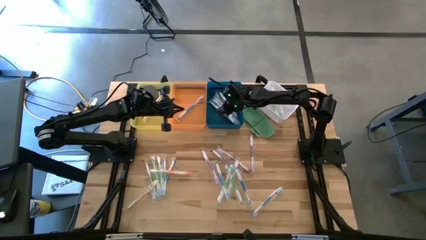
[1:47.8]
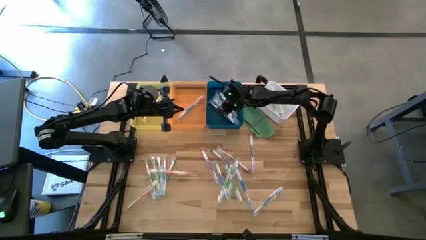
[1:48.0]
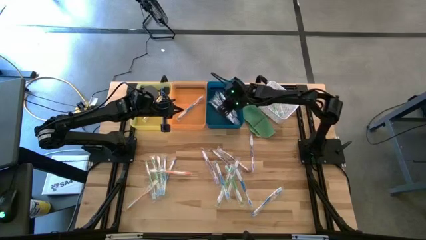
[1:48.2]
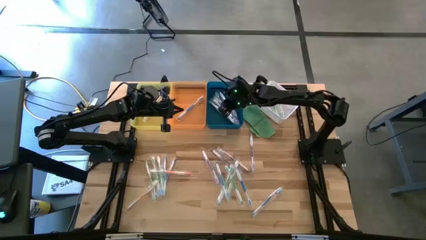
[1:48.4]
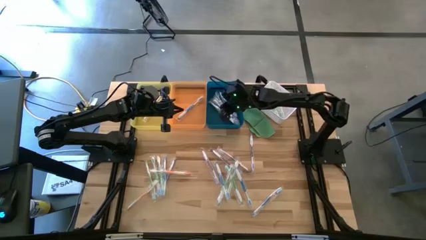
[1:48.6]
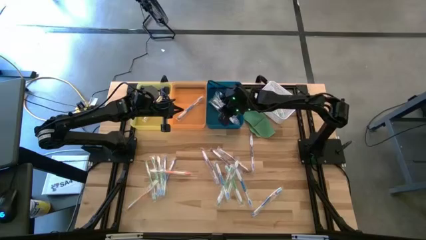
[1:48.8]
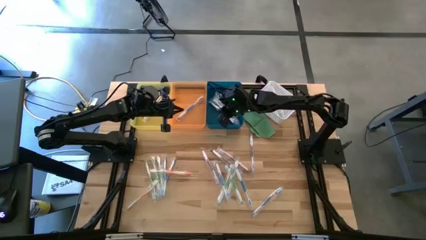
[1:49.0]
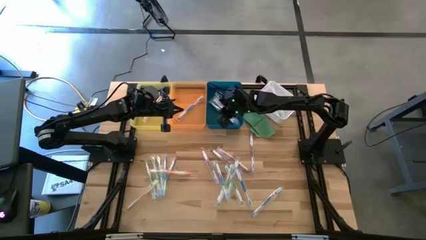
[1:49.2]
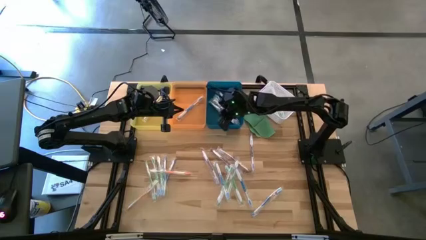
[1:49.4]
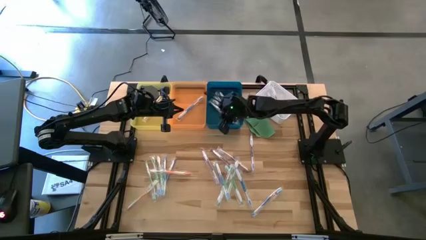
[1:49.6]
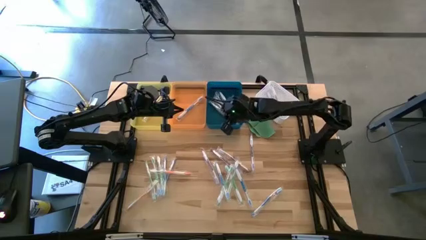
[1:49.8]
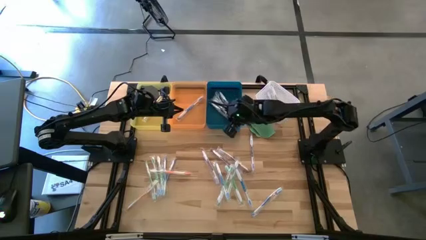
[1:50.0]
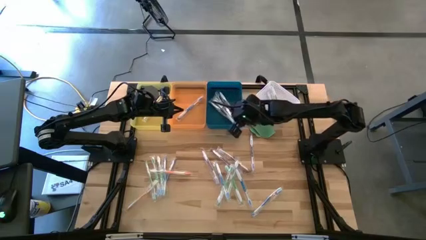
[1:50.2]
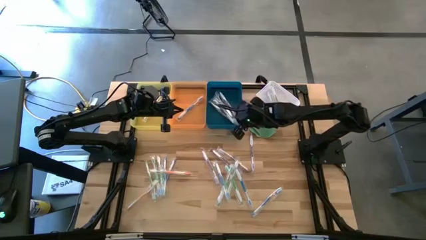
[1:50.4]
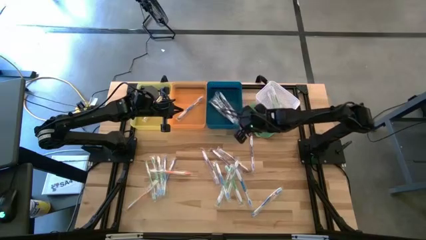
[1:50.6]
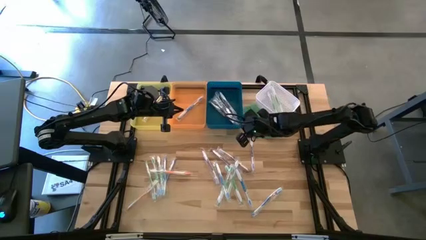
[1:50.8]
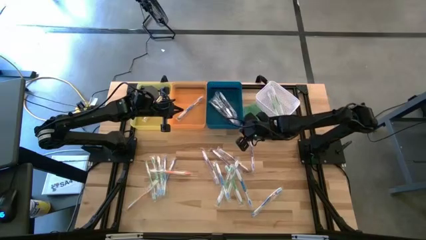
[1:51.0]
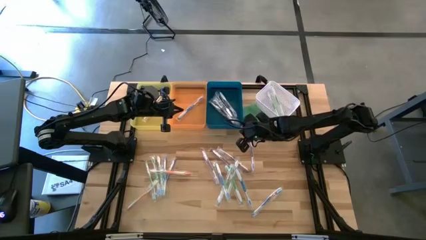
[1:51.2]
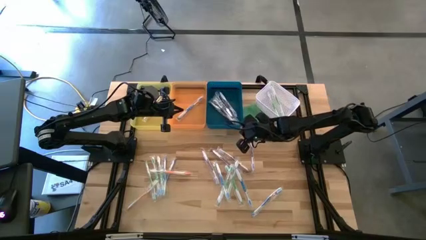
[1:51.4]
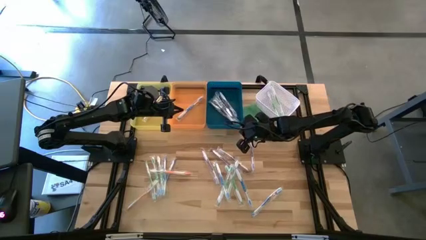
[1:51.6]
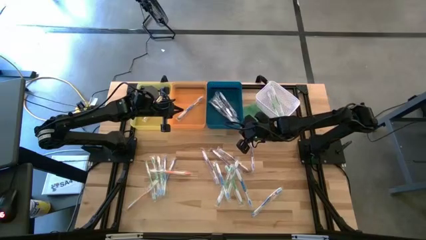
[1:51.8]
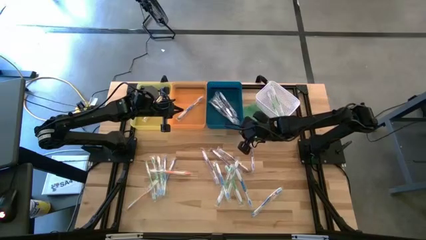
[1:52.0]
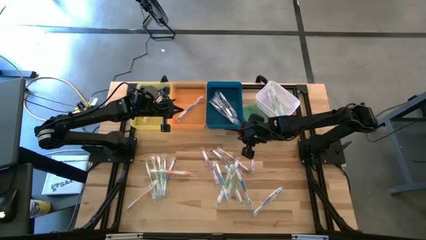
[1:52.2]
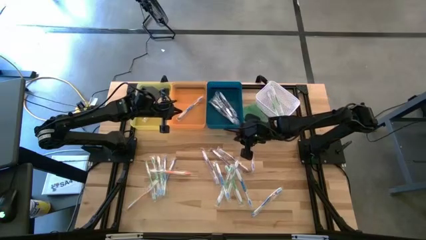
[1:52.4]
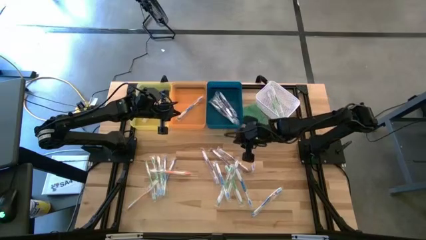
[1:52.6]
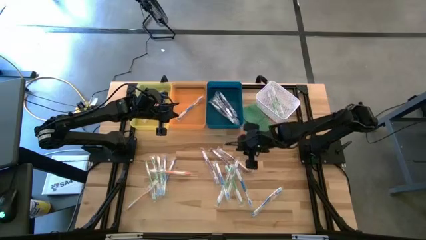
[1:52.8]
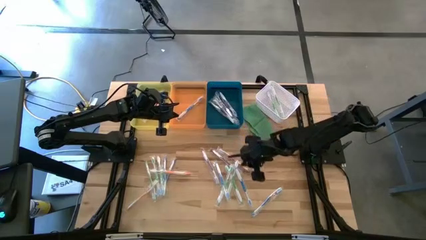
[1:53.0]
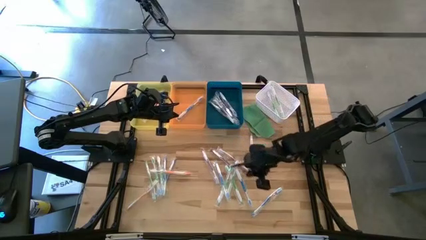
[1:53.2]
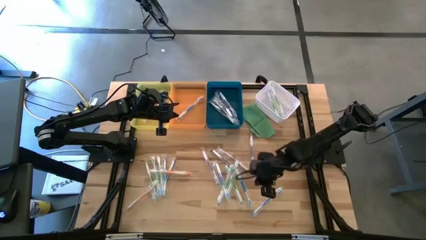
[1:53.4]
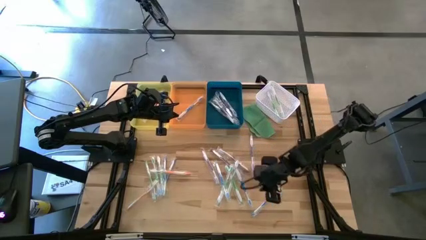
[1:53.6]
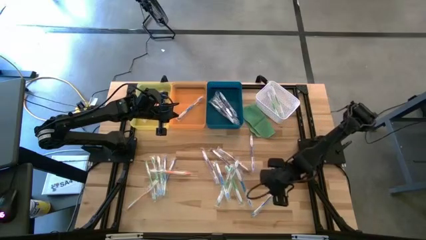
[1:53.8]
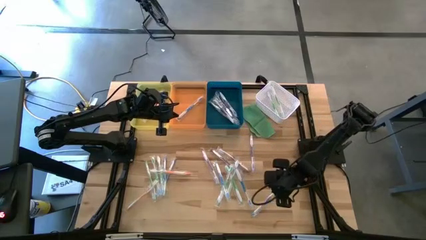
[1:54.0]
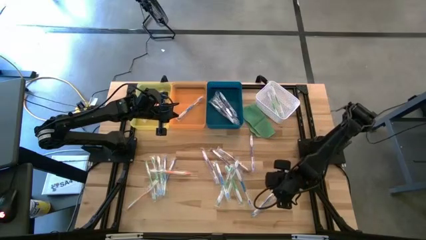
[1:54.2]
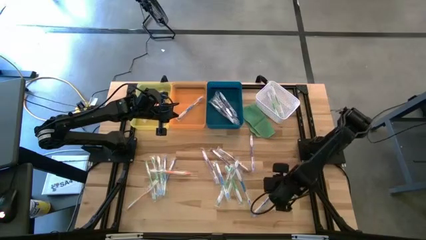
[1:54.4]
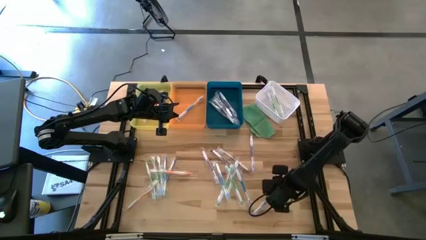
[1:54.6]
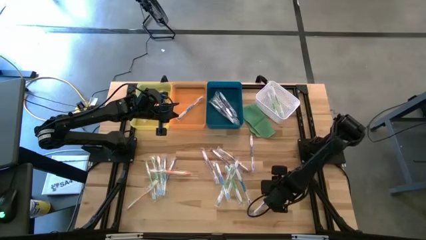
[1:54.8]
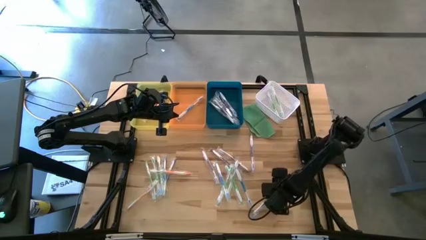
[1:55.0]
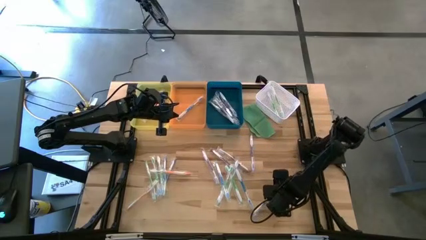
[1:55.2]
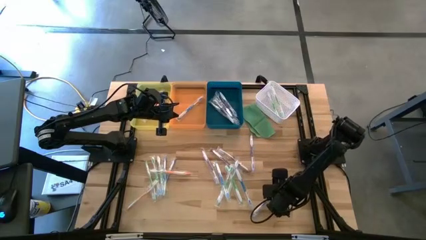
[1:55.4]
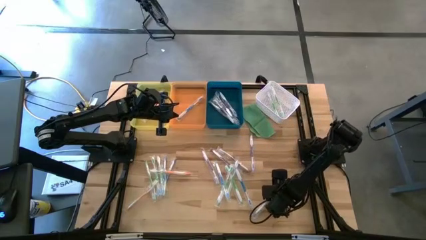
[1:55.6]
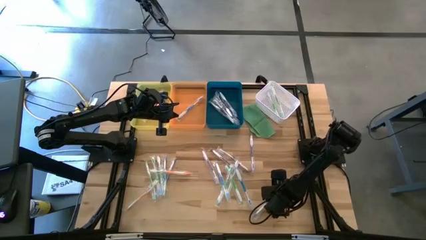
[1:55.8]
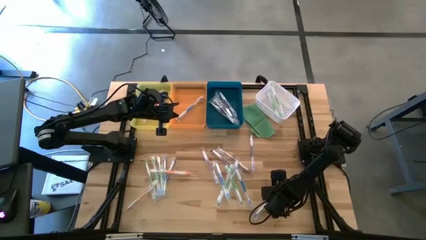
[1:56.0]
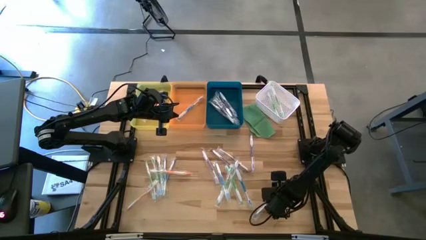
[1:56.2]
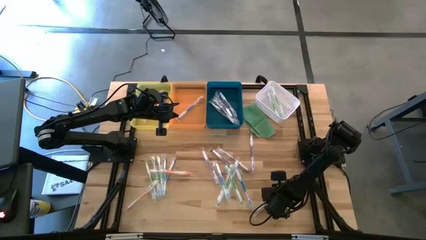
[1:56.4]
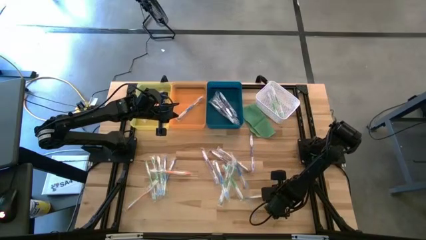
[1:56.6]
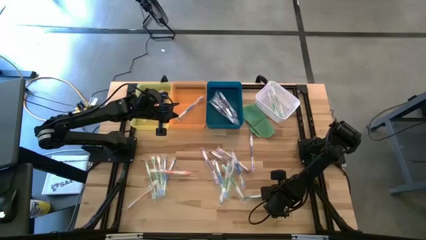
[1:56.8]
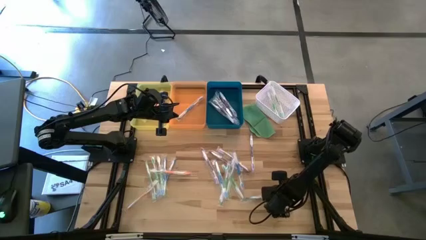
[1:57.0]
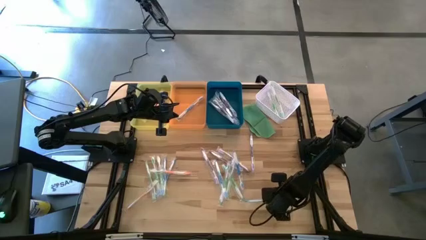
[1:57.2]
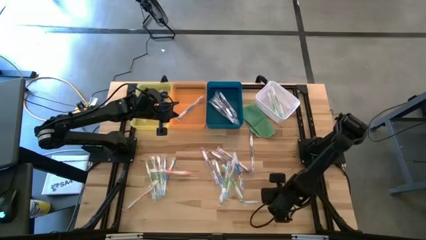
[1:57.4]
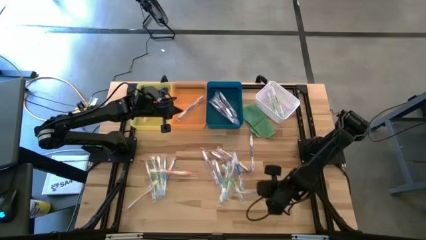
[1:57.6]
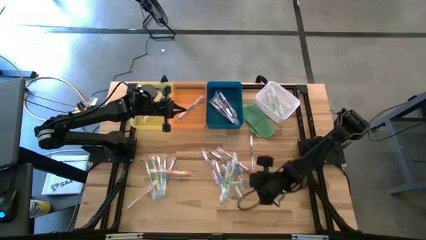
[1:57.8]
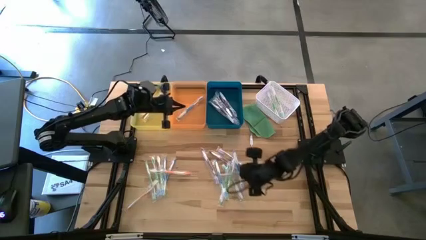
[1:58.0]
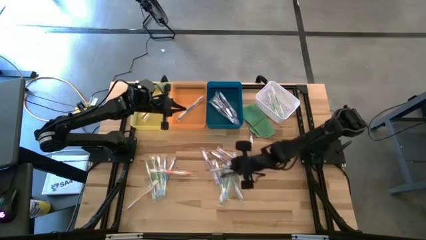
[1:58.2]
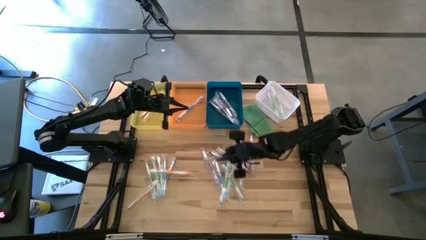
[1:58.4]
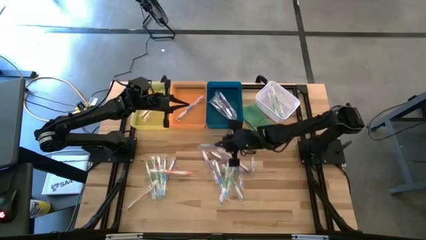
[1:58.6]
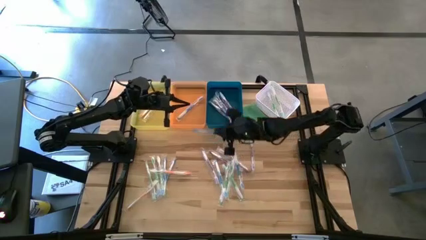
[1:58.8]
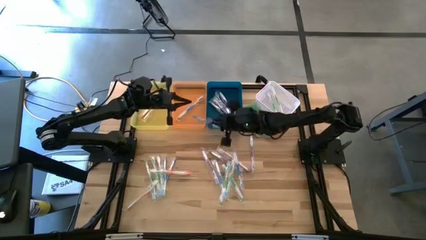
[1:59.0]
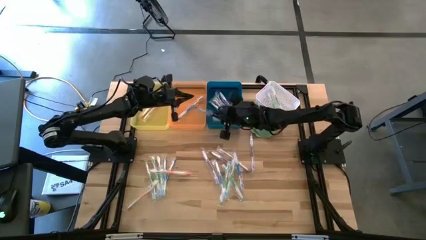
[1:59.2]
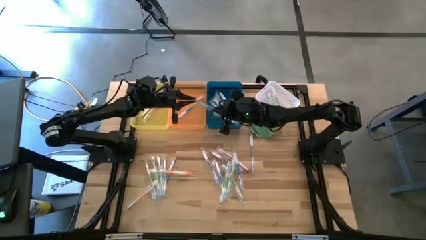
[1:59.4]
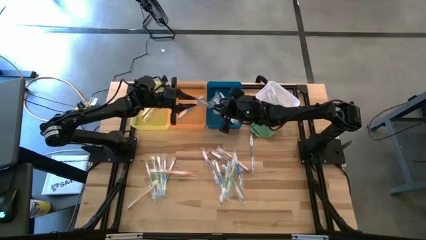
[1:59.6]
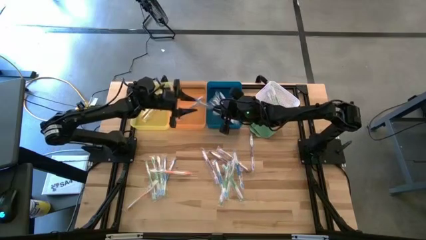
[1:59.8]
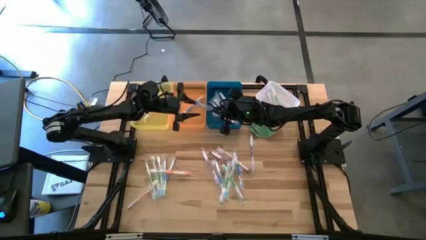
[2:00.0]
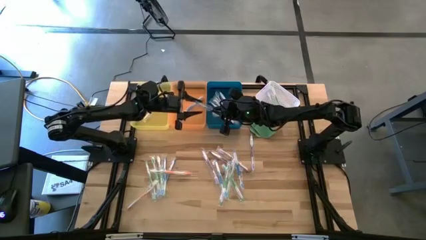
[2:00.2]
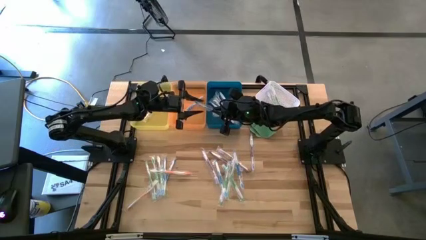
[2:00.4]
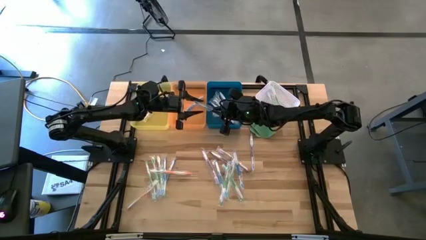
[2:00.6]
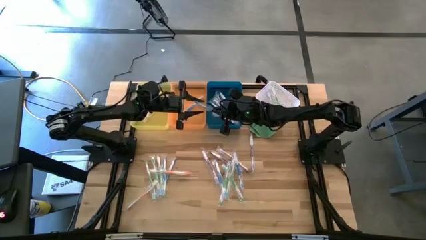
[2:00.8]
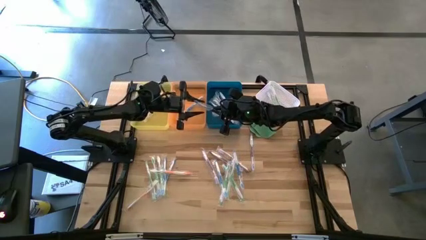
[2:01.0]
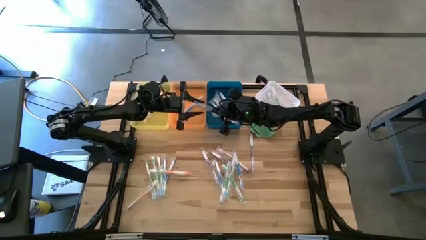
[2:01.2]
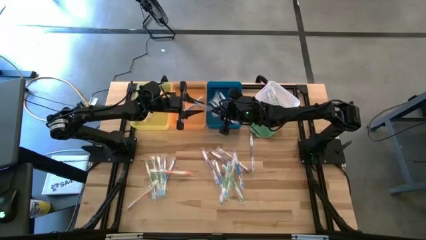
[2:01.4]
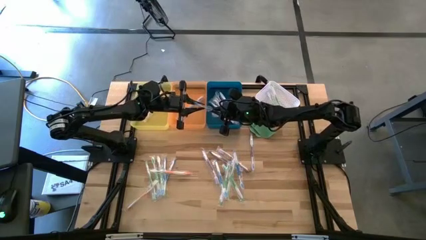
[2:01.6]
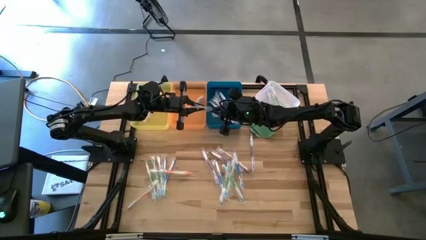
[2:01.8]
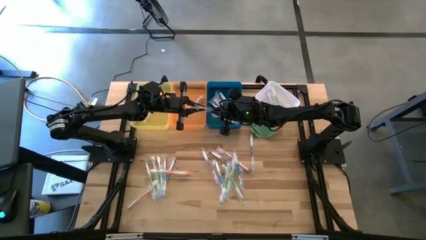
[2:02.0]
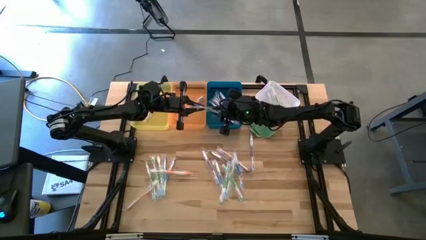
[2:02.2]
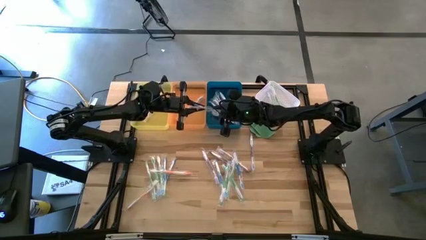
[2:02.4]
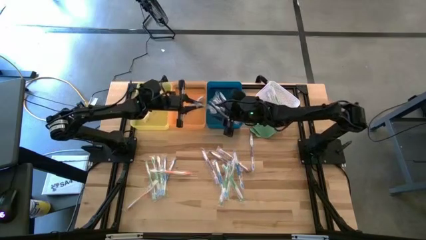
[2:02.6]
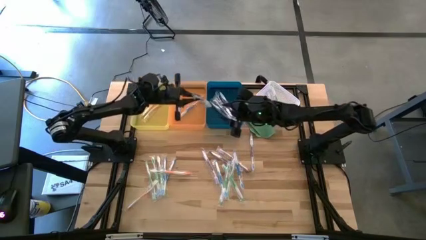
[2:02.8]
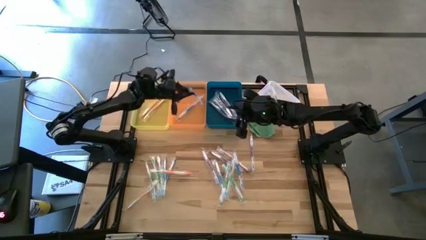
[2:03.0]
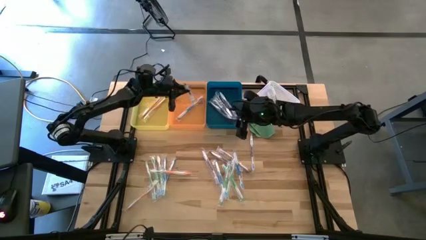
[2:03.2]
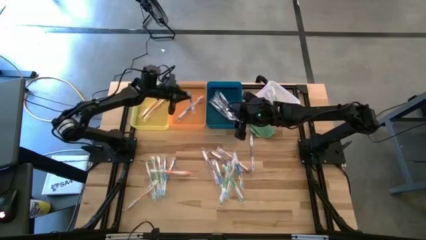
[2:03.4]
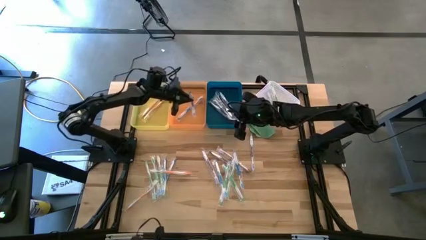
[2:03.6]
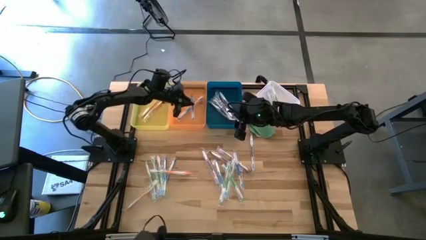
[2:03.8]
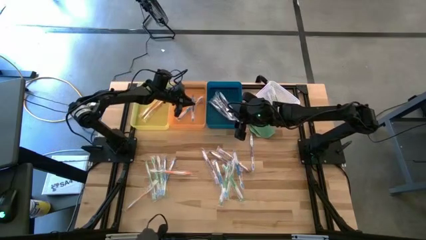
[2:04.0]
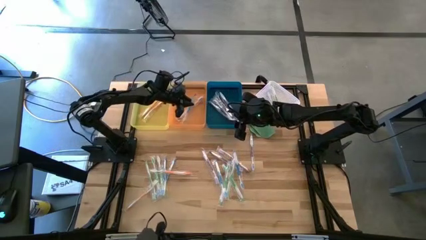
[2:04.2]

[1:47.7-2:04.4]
Task: Pick & Place Toothbrushes
Put the blue toothbrush into the orange bin
